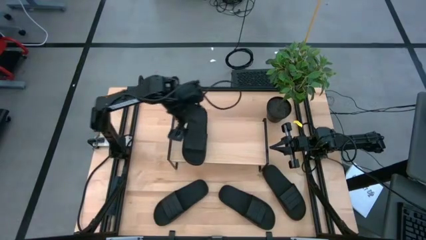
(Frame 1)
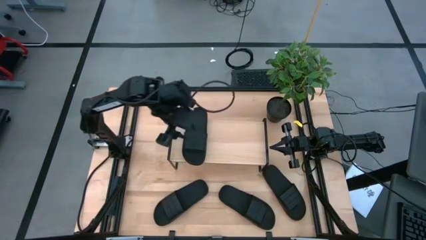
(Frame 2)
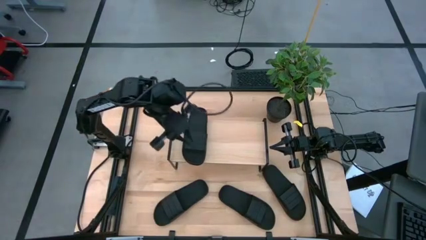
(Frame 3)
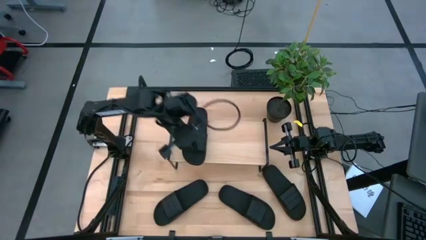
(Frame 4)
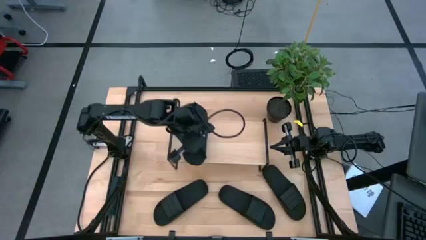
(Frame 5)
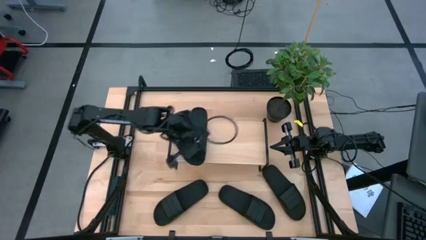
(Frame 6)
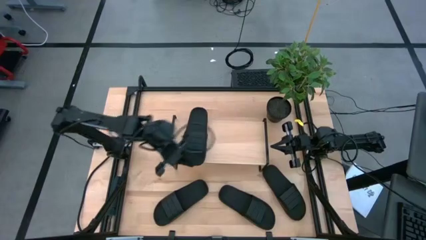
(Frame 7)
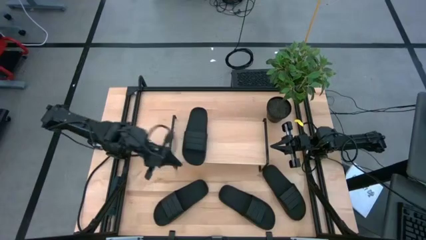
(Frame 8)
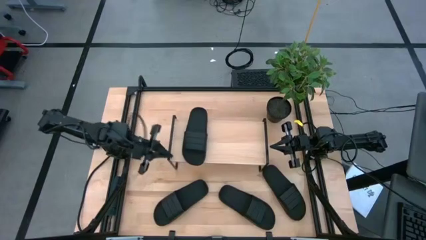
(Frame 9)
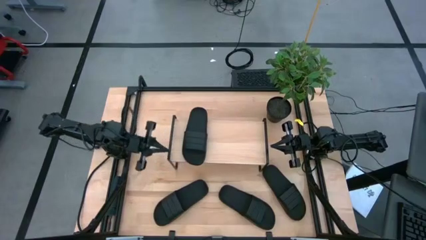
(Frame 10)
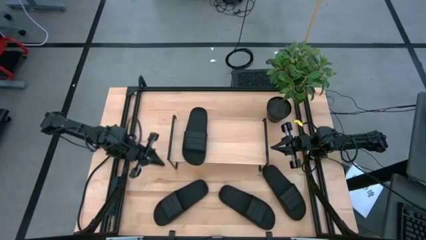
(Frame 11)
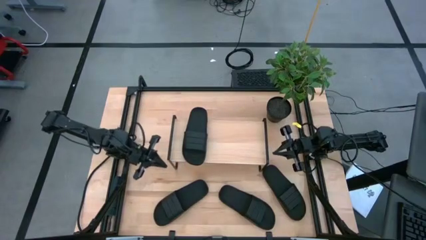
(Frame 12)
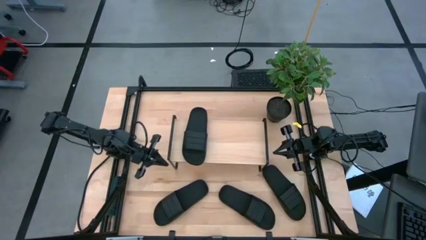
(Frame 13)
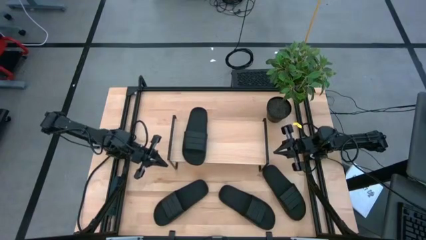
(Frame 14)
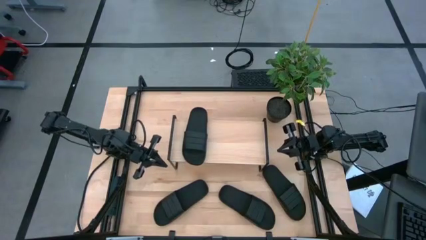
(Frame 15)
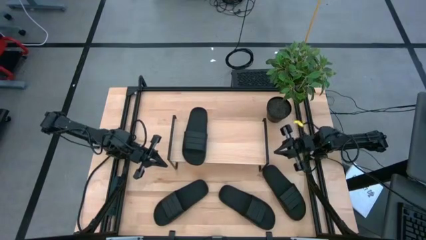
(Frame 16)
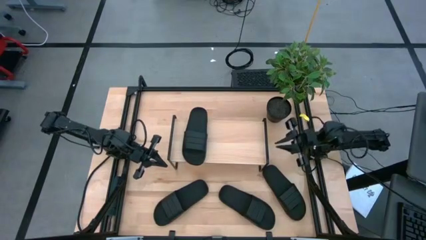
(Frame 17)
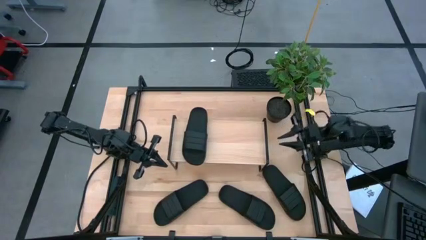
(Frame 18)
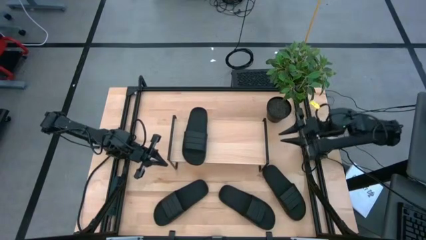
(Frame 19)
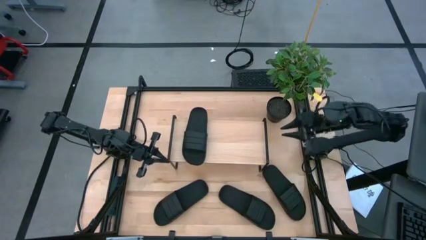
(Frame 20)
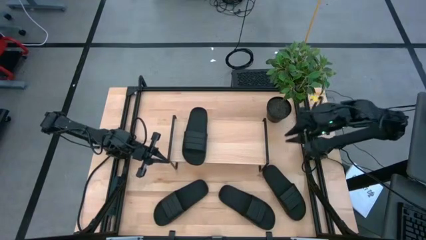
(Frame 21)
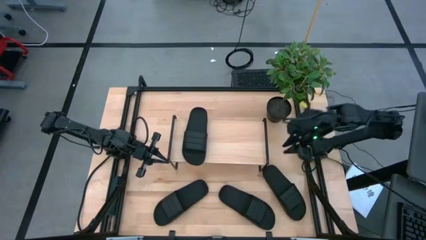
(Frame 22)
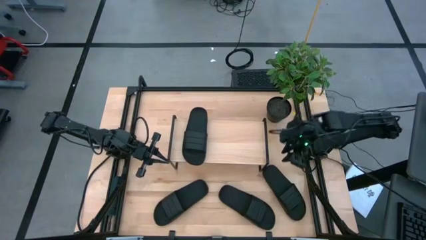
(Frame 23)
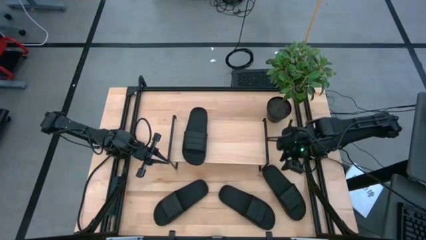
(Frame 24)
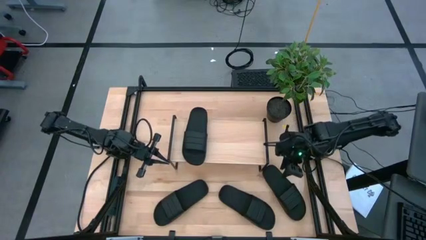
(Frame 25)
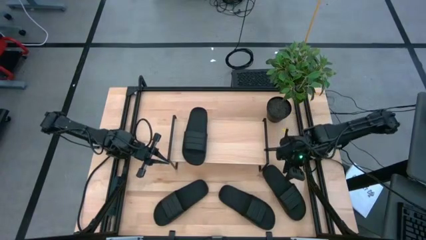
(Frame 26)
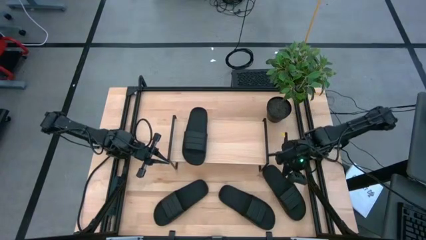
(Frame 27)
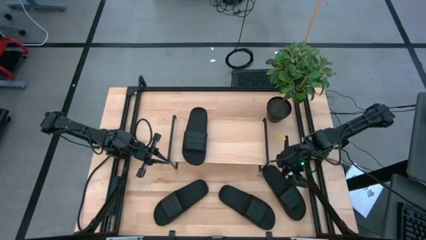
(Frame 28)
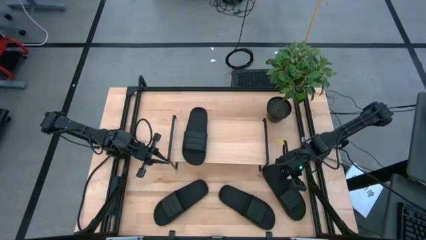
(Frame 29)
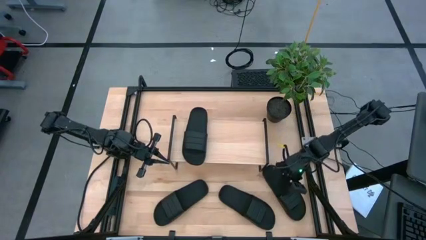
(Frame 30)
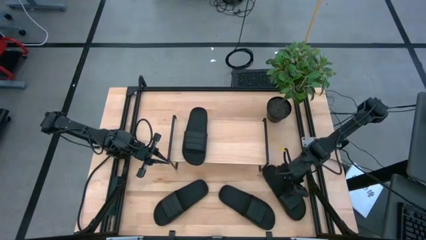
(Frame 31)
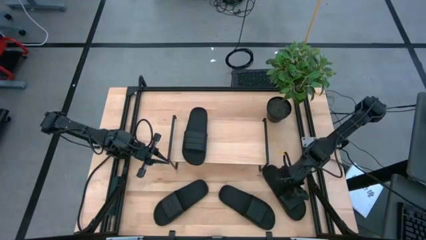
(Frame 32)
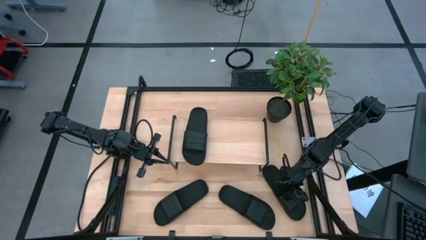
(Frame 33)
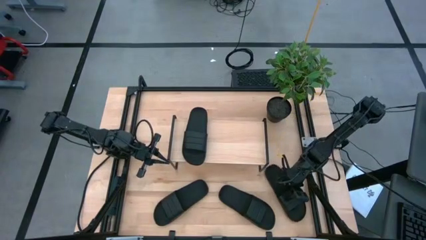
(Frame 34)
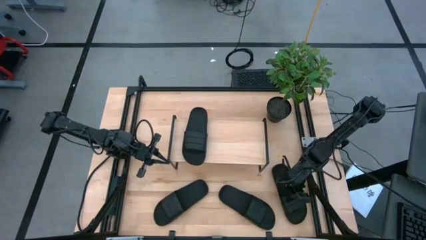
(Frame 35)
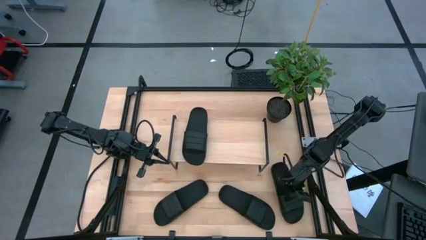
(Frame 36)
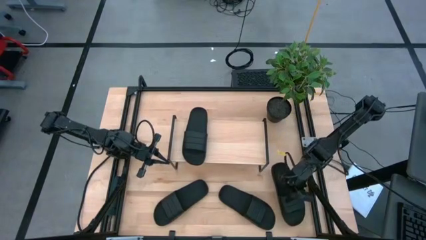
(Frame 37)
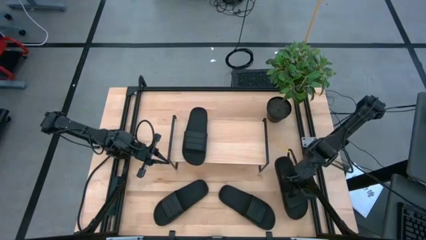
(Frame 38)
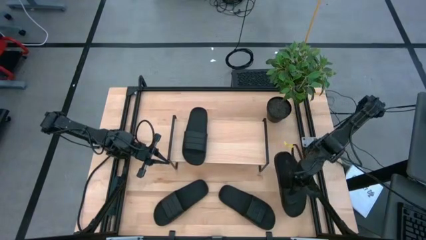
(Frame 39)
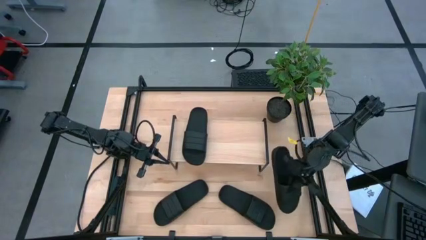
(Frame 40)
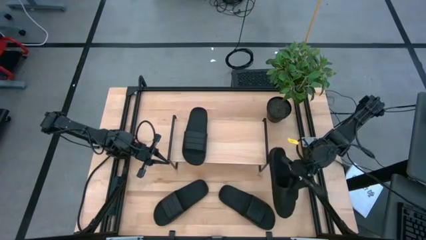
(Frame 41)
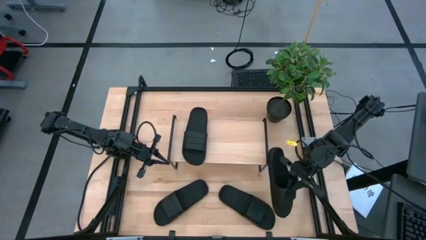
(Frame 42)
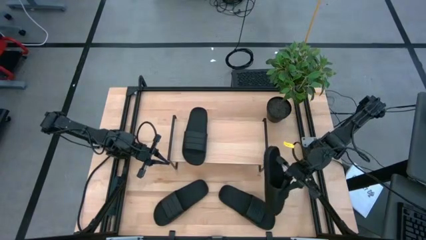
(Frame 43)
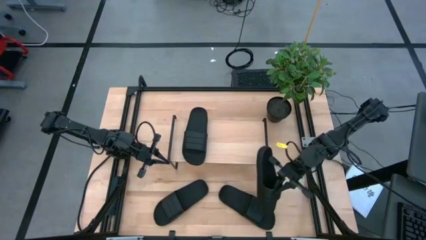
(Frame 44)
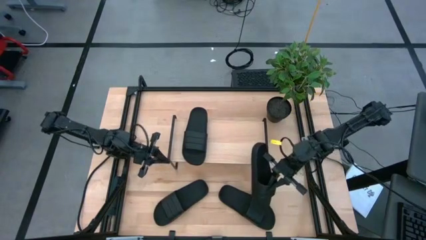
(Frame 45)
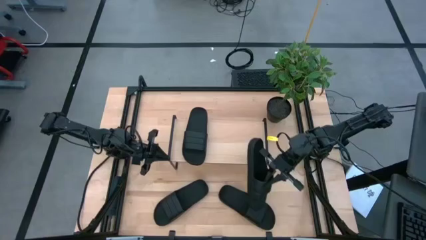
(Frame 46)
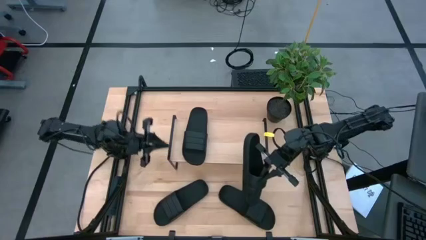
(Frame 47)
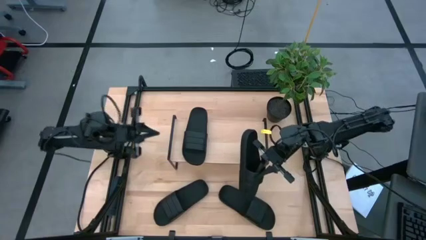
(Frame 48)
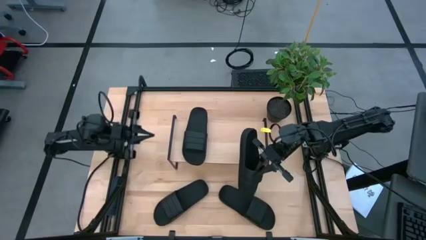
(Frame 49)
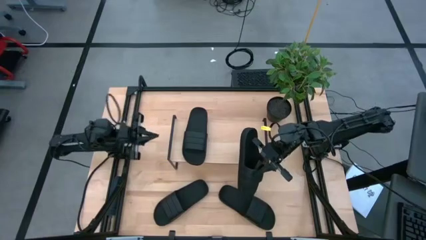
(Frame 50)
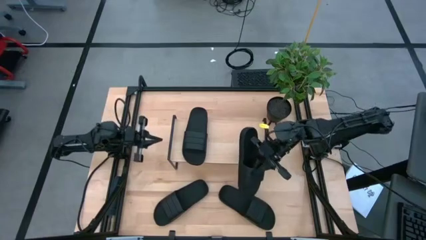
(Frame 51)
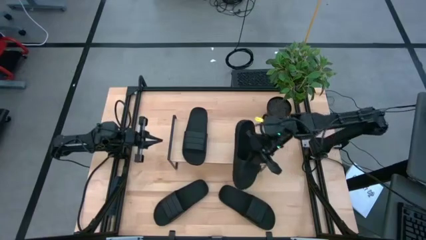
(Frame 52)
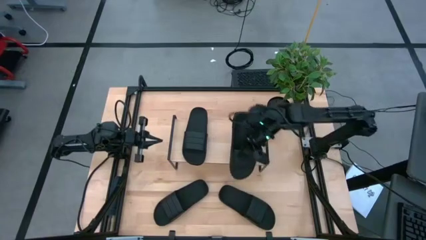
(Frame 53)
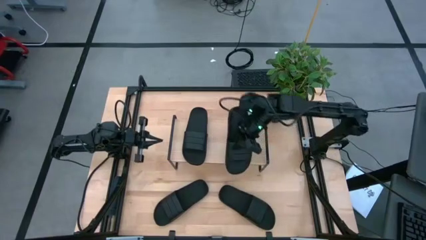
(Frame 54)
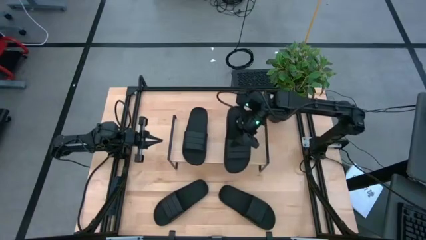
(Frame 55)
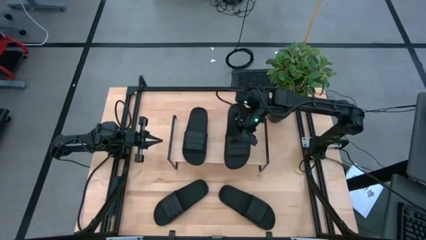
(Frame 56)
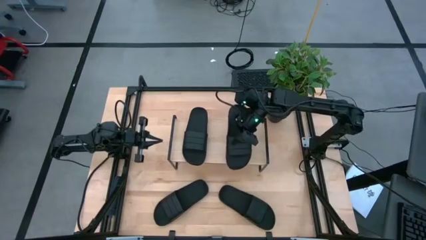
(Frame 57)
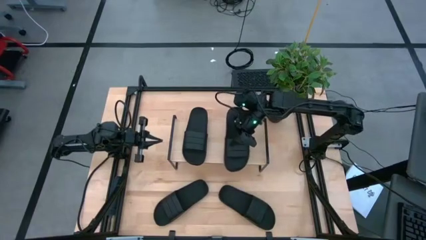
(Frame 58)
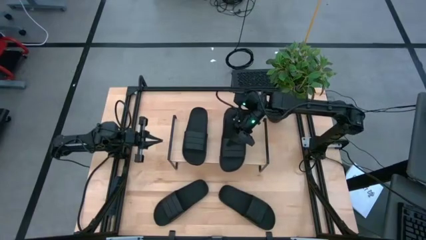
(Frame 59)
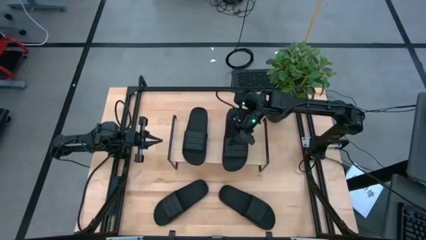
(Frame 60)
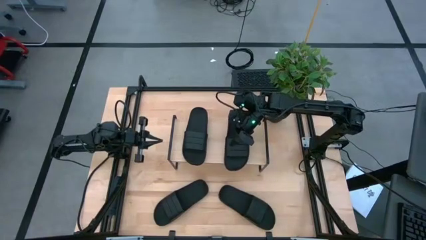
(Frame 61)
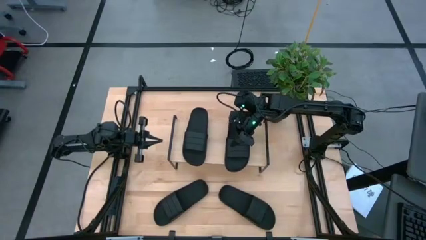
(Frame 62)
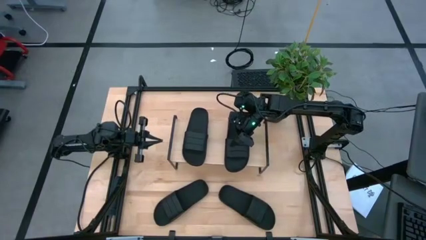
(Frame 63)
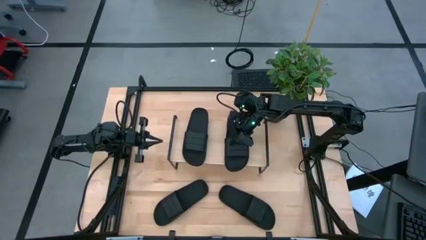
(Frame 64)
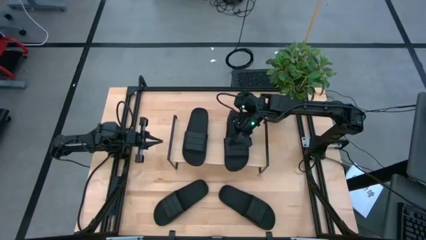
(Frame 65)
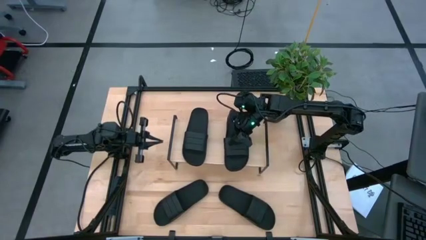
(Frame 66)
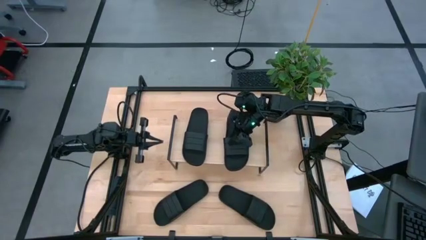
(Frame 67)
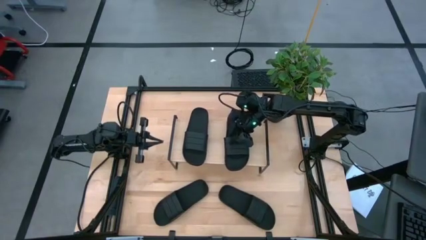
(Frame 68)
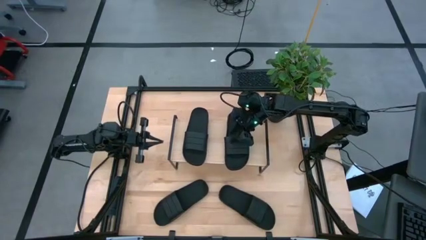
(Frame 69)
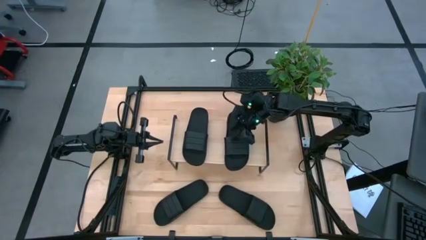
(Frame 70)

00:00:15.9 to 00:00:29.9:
Task: Pick and place slides into the shelf
Put the top black slipper on the shelf
